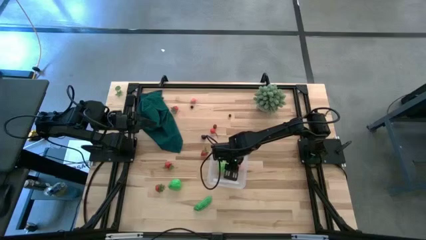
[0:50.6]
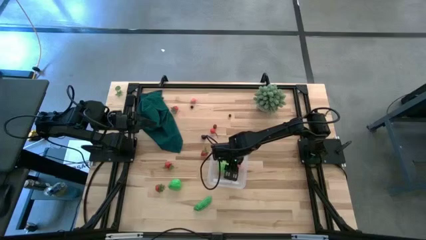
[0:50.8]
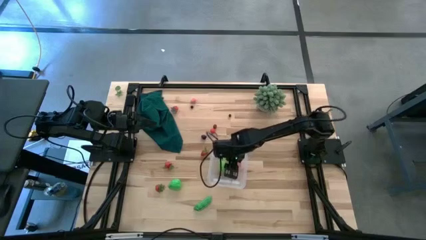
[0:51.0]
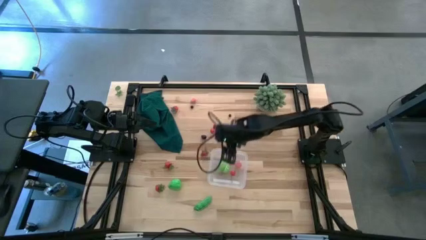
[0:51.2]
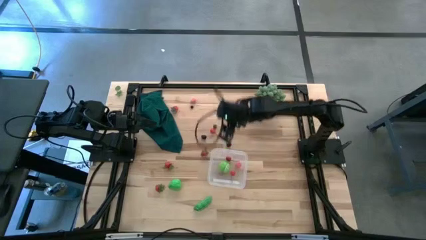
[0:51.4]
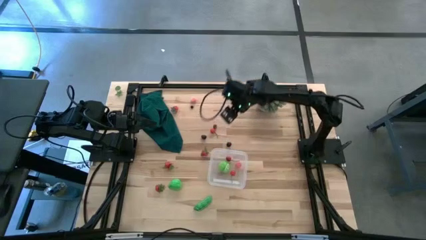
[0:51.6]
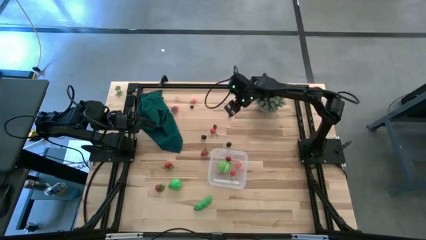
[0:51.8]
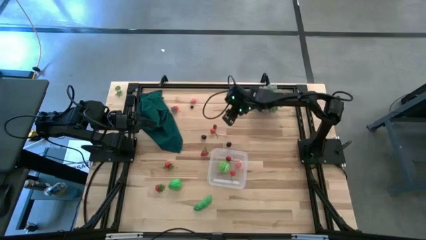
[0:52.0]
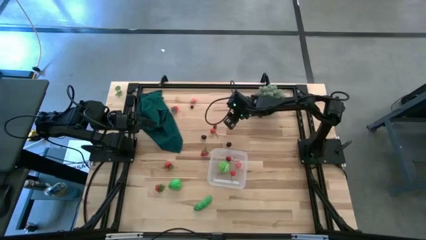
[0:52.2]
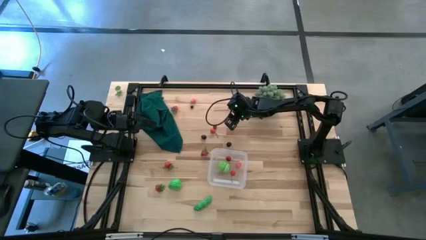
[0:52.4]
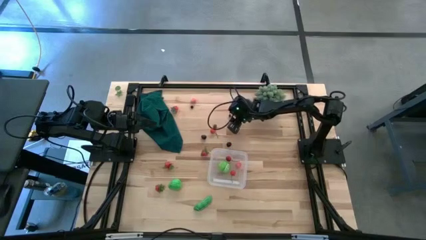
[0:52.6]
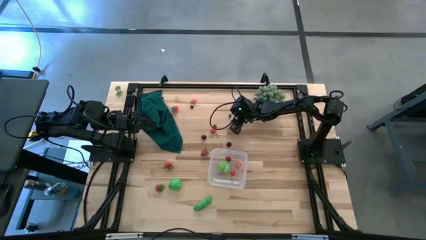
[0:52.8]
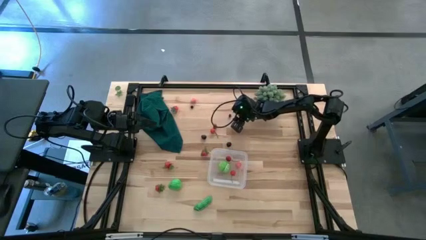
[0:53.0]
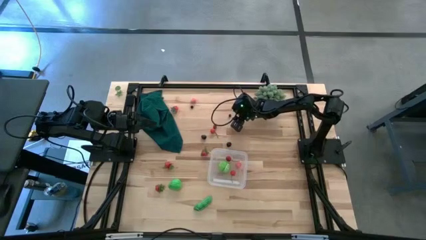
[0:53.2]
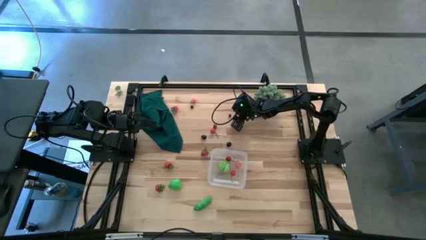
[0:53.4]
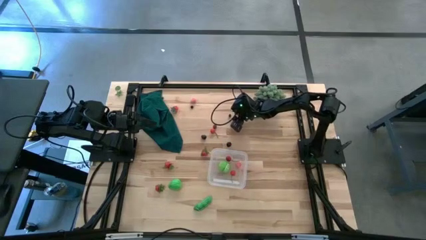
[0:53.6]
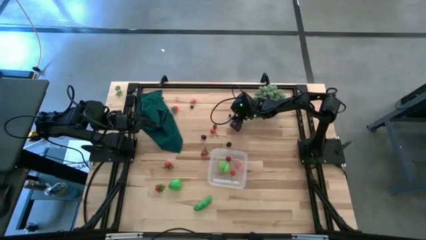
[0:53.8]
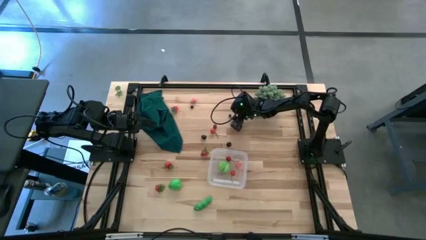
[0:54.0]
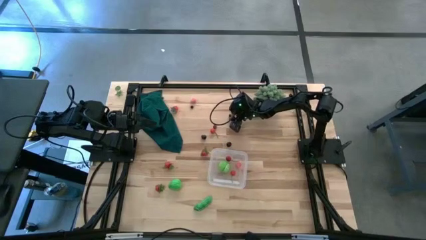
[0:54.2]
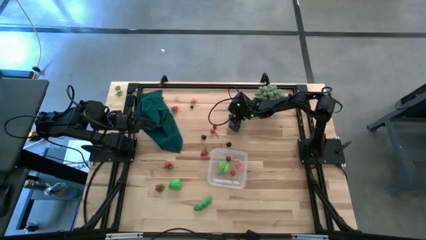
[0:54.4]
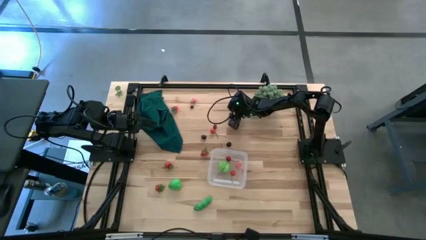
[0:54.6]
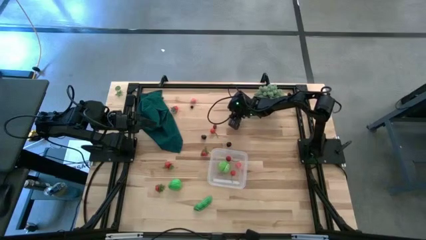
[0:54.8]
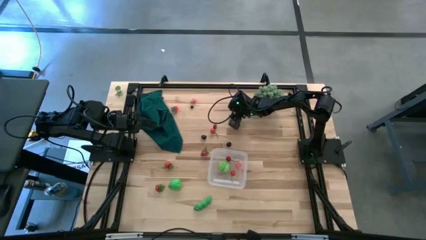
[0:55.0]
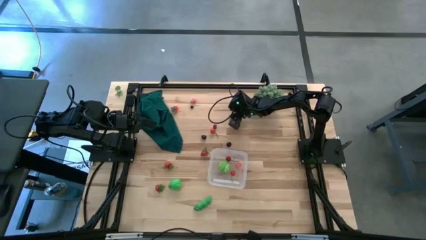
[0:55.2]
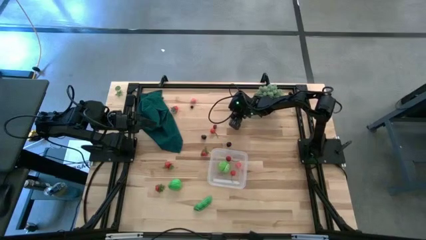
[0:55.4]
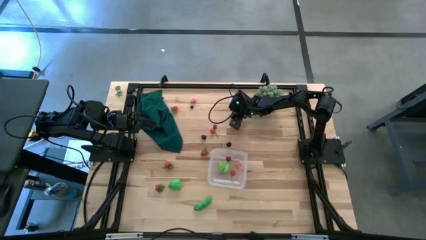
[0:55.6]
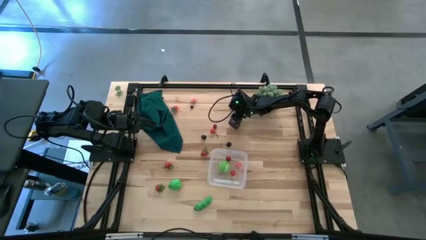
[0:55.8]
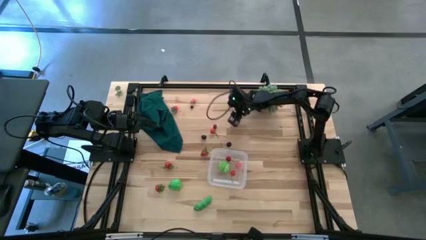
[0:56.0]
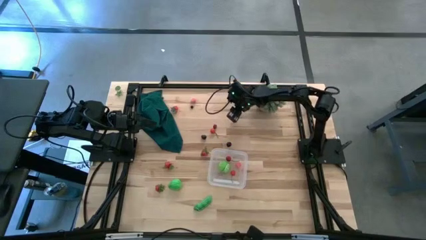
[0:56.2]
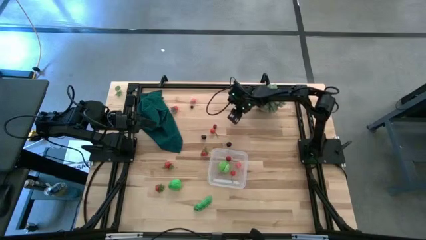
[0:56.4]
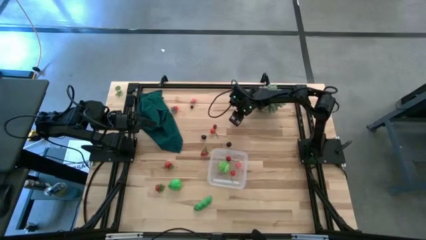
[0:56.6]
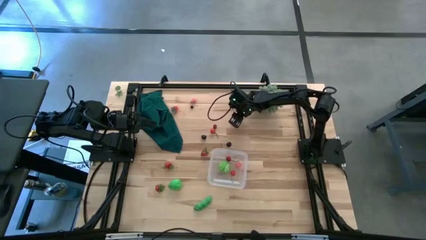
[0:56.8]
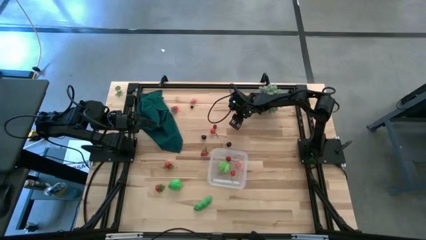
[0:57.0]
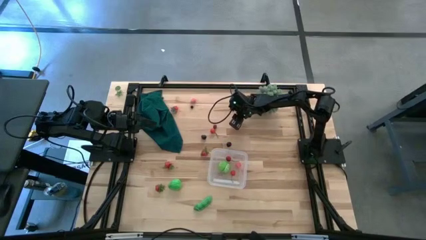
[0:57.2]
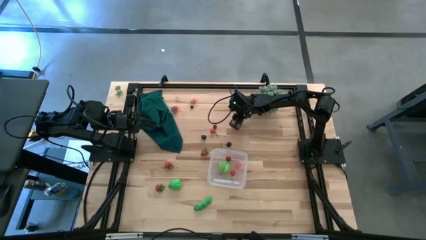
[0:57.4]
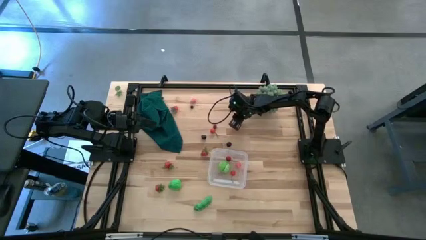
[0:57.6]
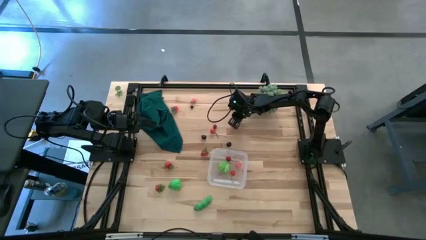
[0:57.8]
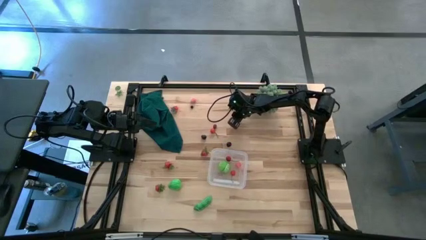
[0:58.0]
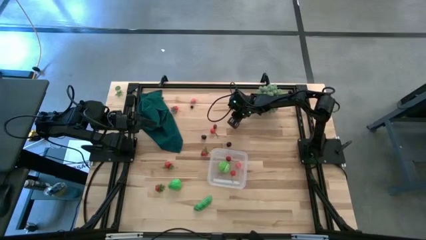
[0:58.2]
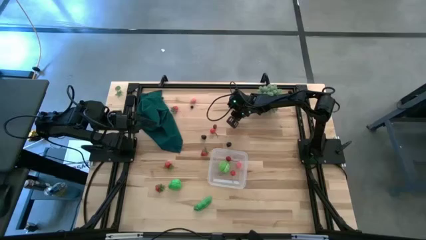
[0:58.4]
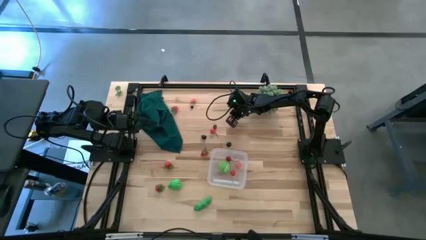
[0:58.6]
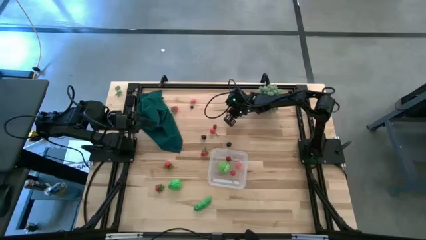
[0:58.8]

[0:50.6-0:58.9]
Task: Pick and placing Produce into tupperware
Put the right blueberry into the container

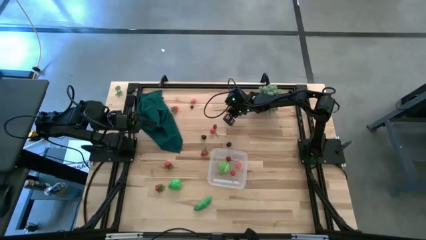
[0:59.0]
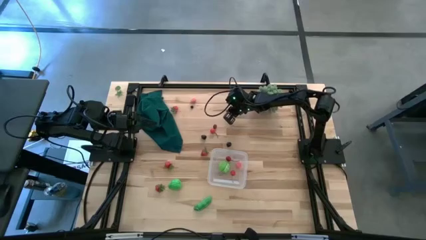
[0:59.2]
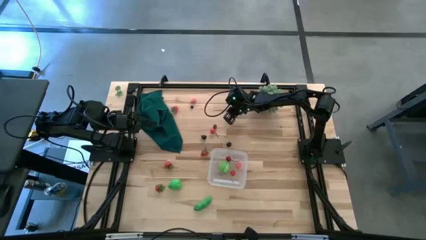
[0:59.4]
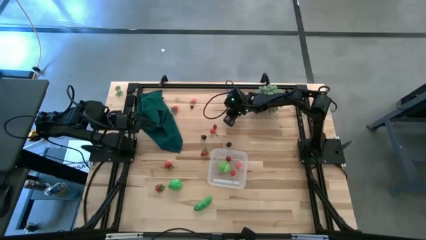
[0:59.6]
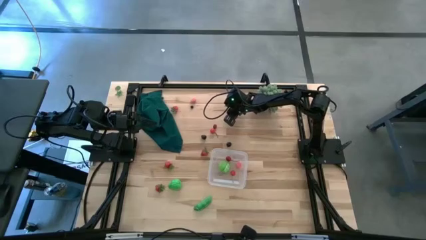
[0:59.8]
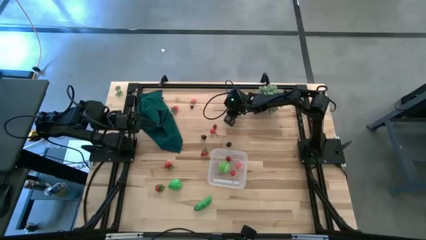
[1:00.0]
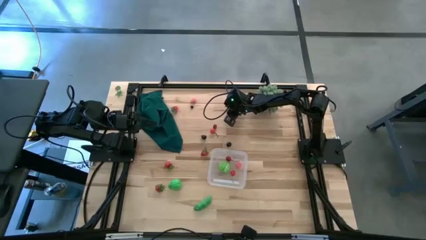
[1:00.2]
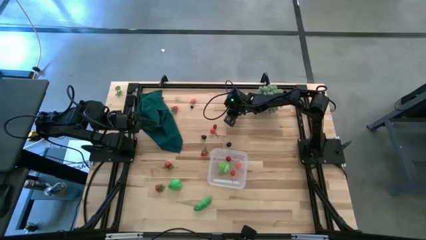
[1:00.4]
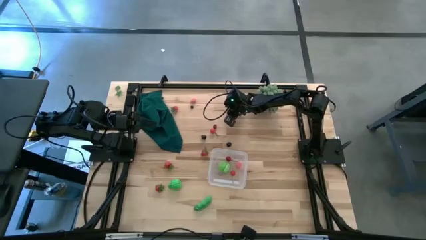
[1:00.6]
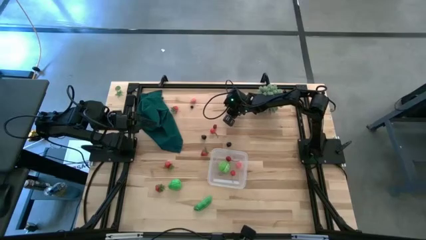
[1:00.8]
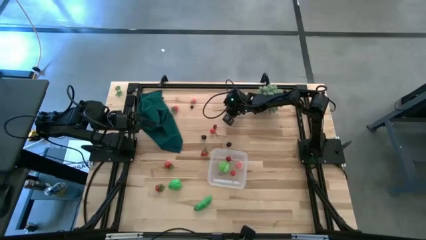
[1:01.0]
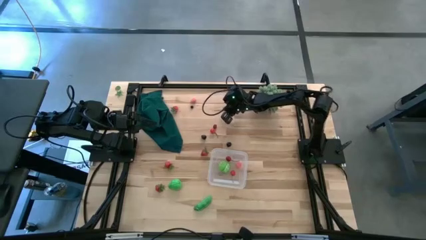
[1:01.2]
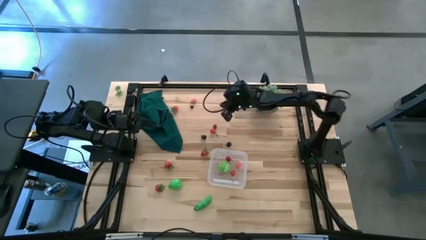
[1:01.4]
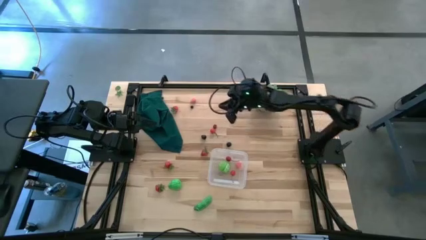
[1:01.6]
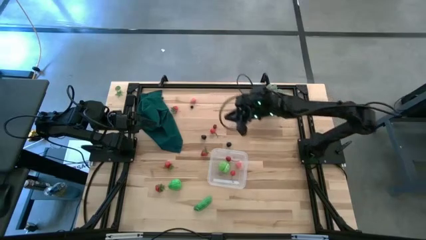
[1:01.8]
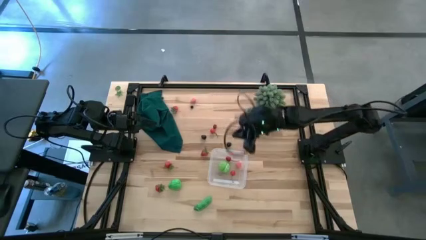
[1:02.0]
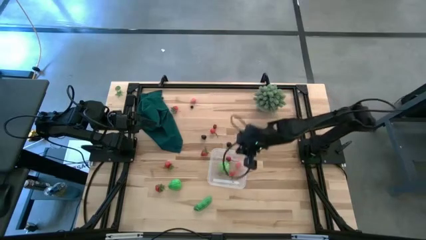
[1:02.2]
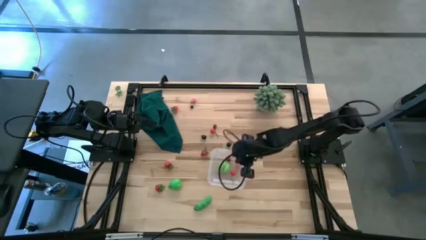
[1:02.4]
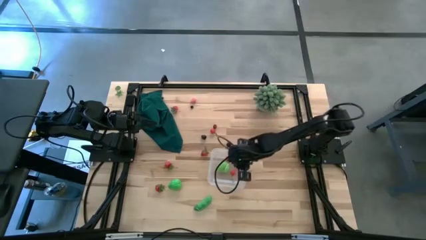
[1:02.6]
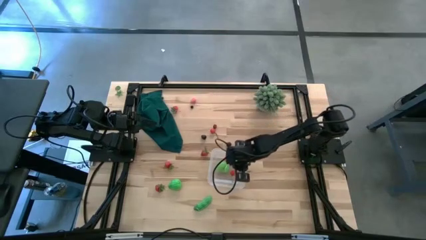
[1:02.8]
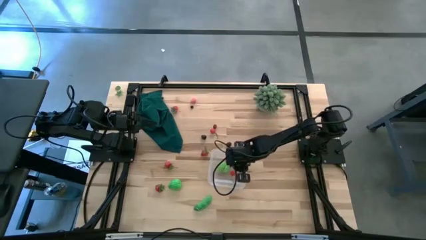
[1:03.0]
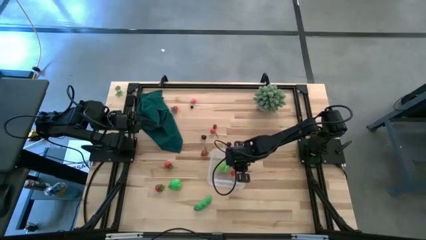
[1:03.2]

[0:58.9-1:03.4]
Put the right blueberry into the container
